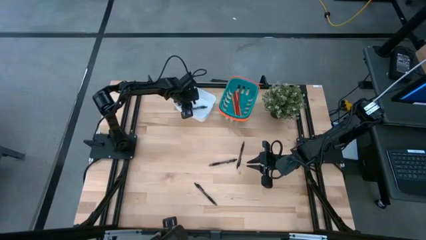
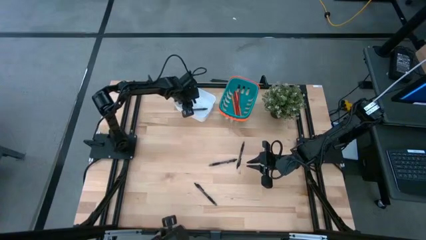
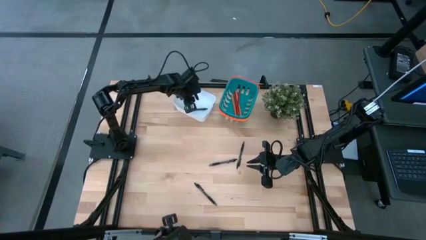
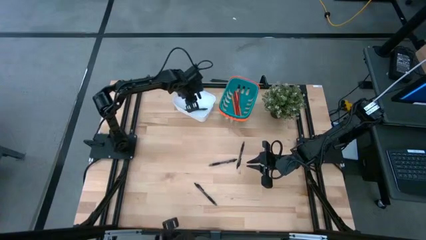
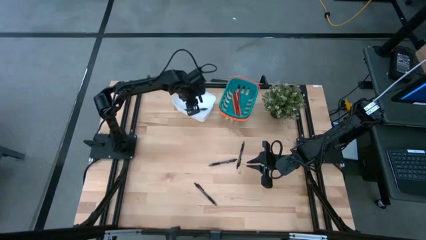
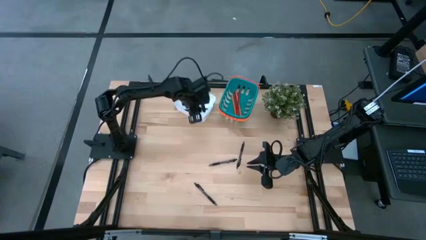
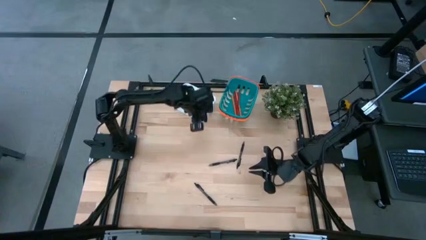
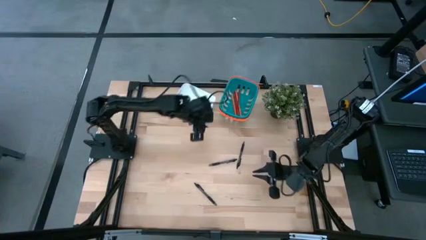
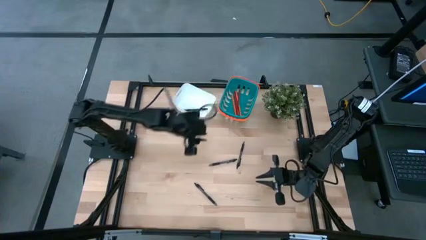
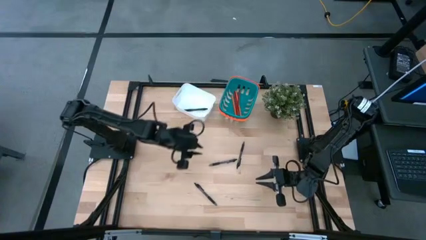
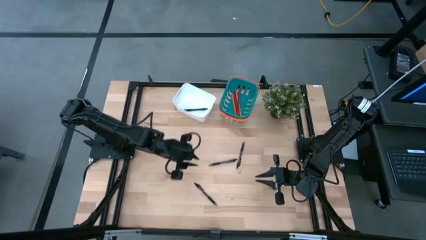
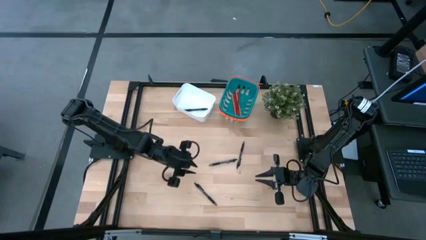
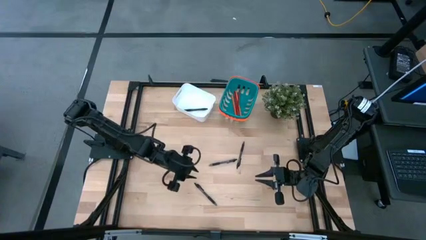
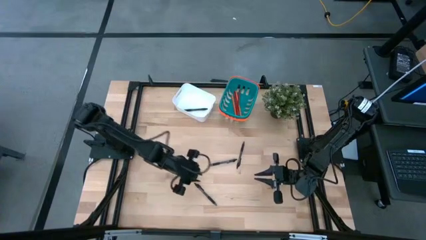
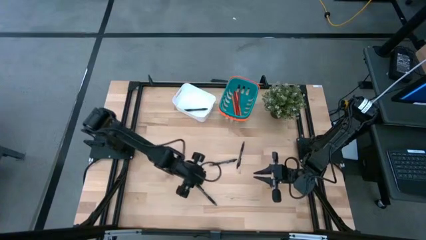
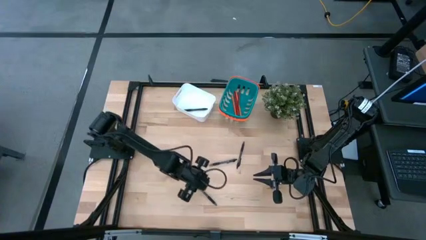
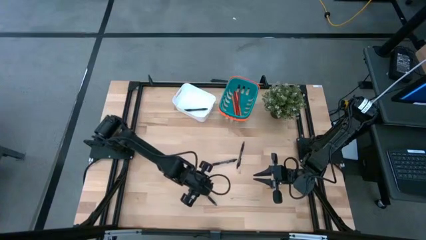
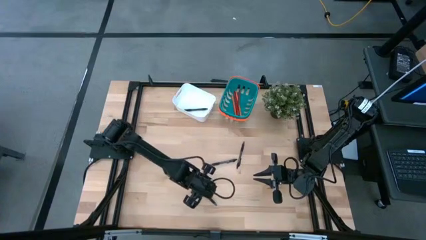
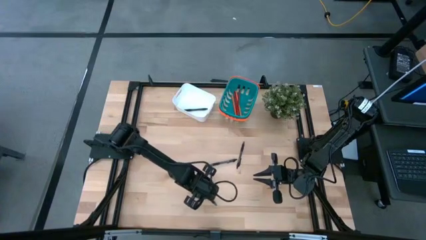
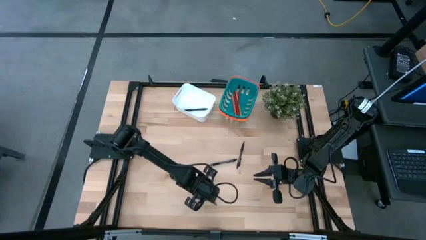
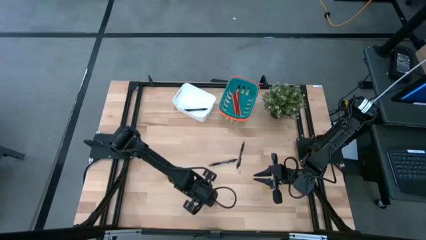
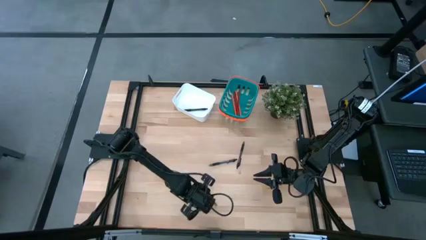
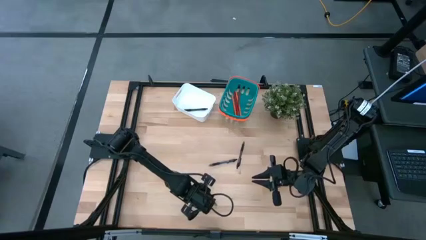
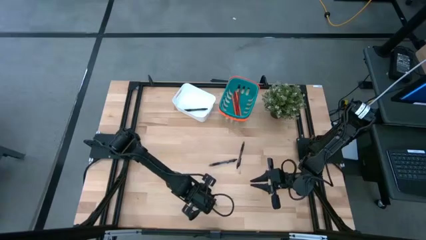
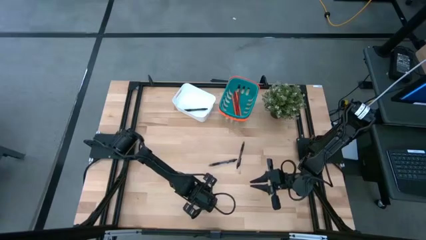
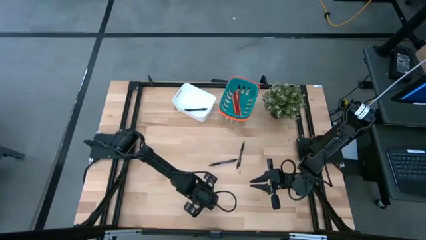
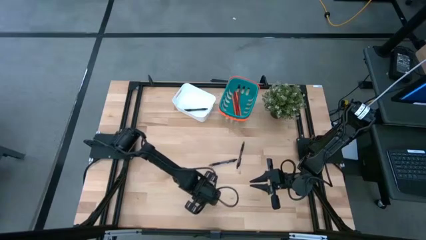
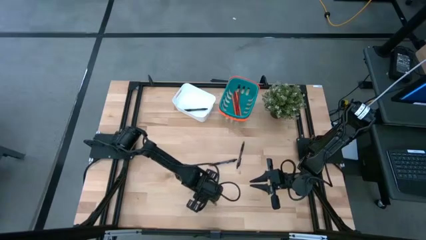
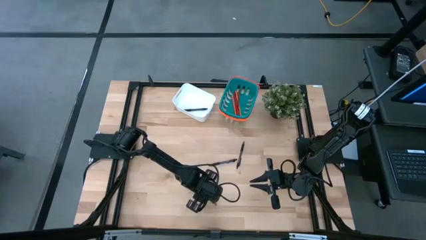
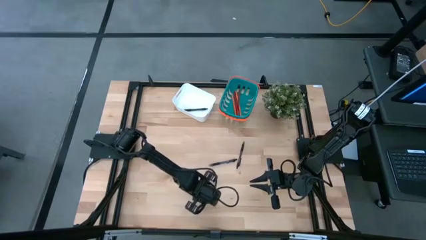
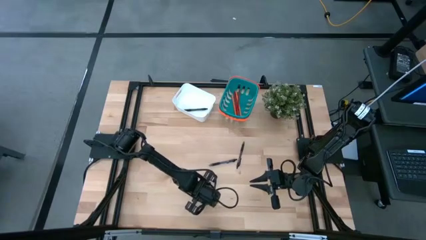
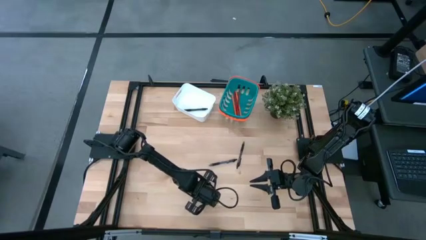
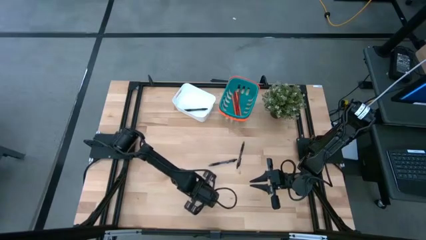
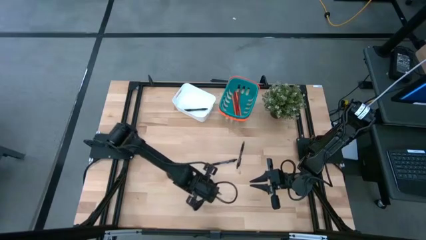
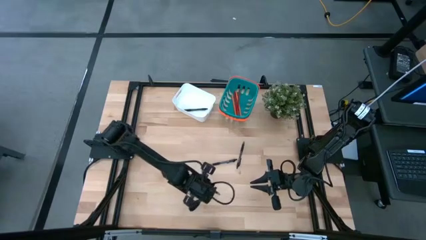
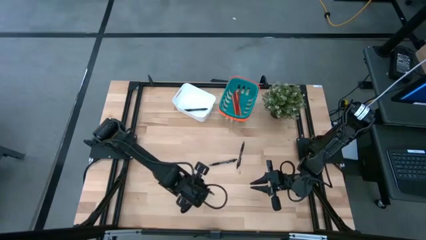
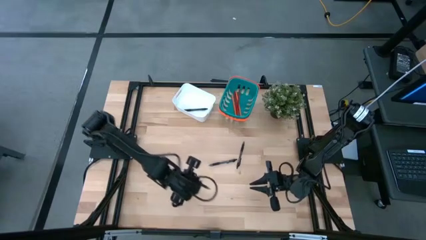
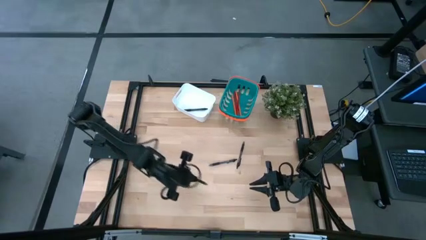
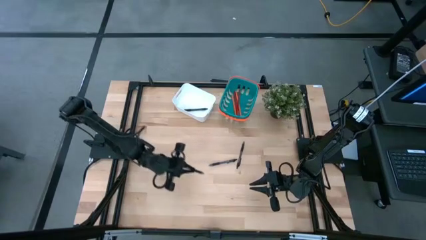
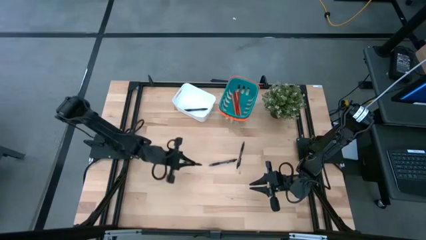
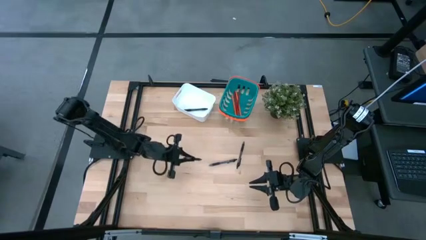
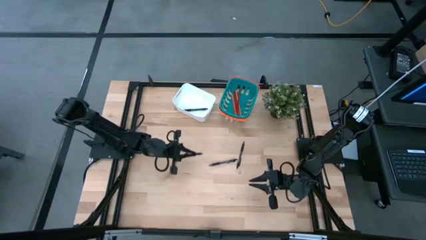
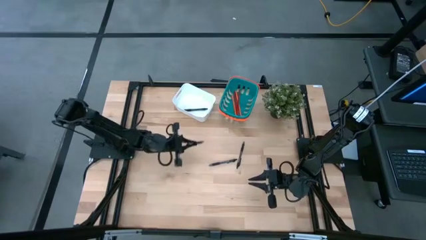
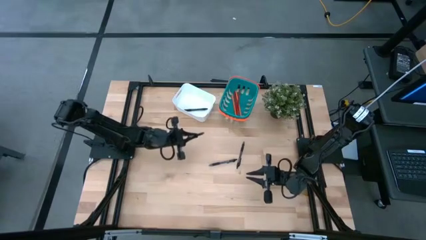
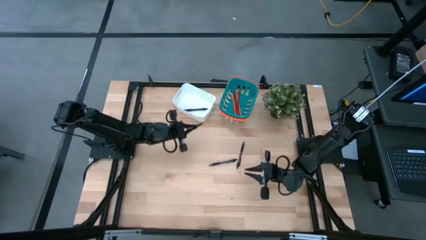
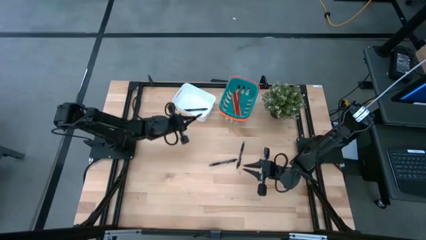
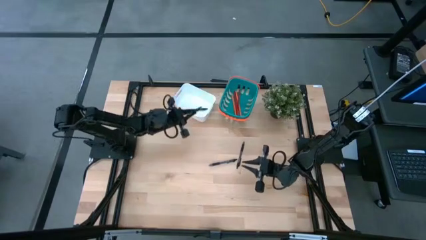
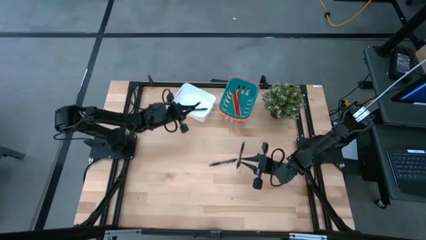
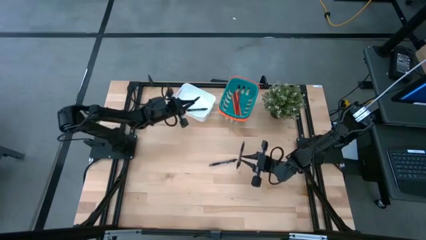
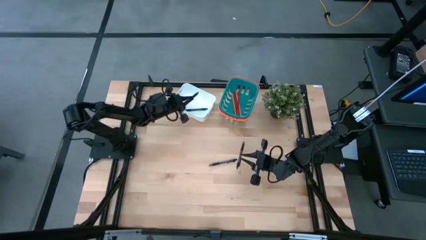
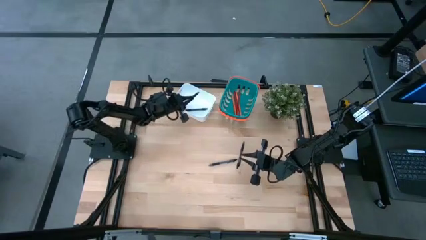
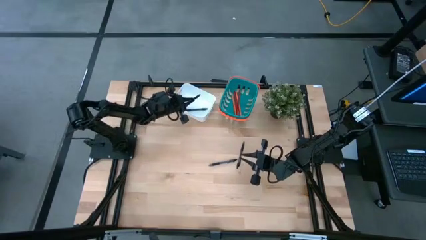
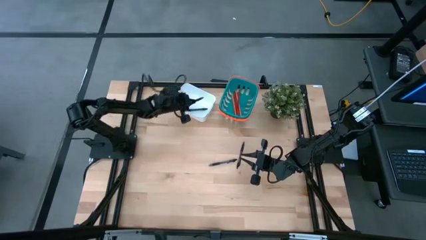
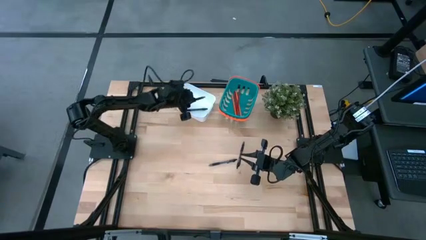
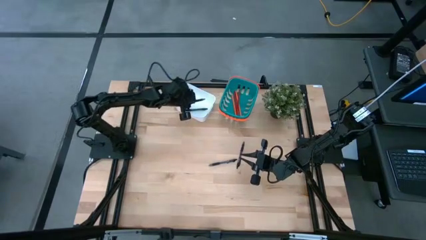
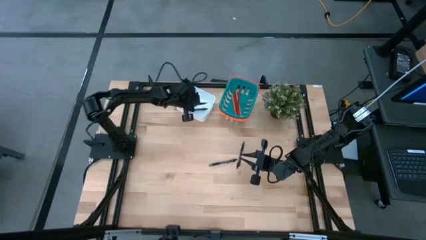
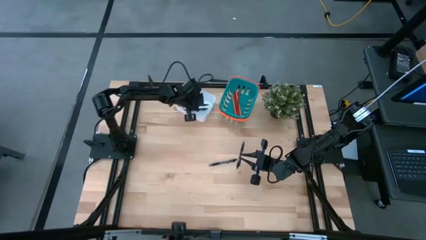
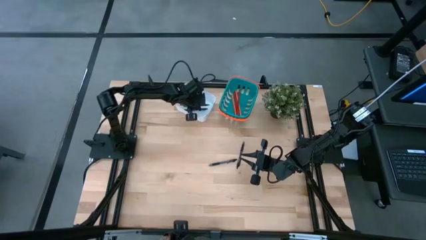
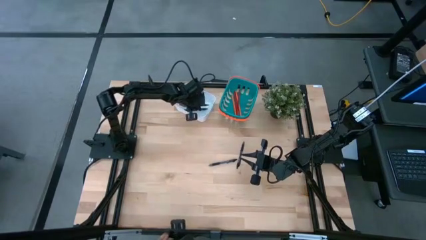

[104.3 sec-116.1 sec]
Task: Sort pens & pencils
Put the black pen into the white bin

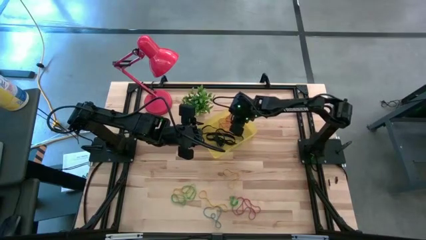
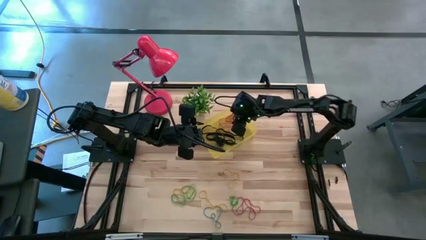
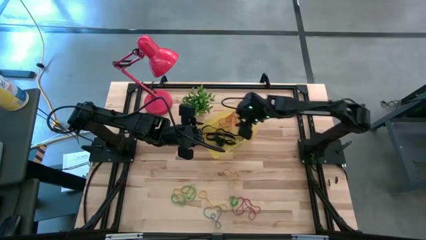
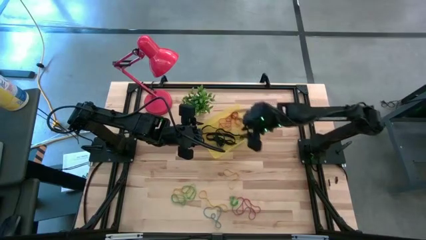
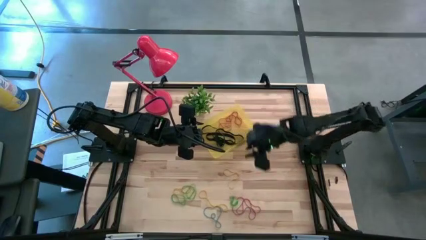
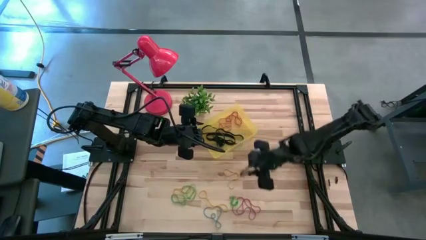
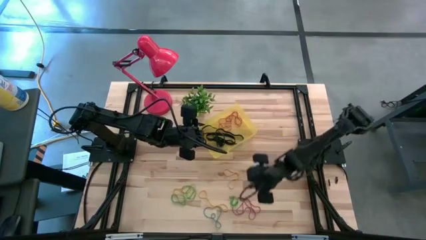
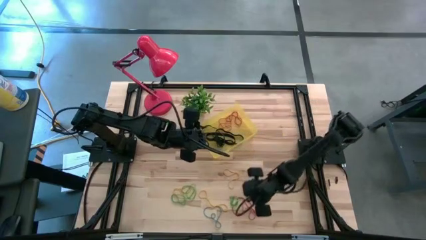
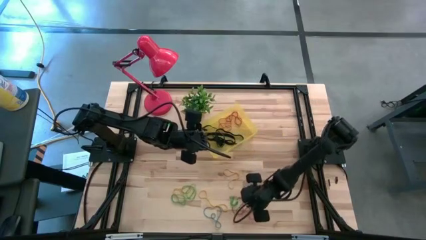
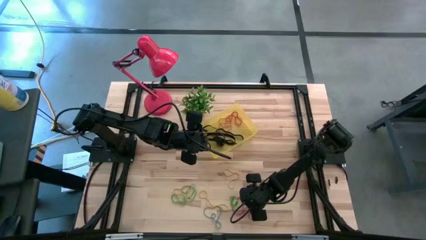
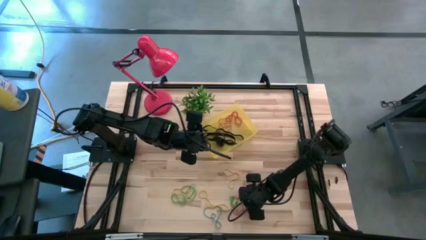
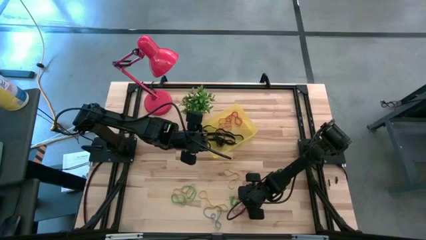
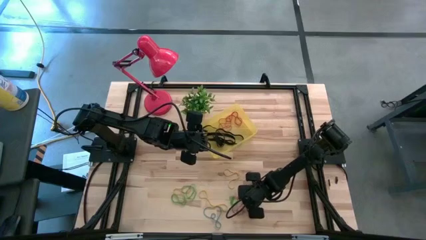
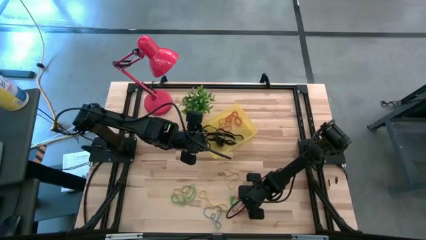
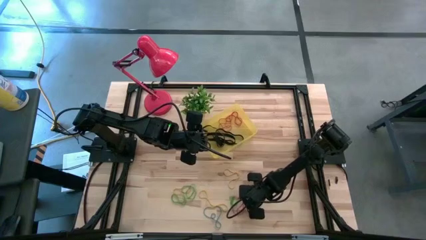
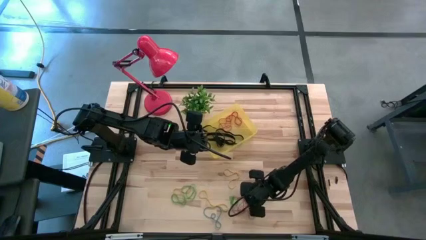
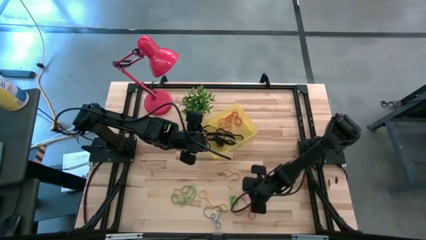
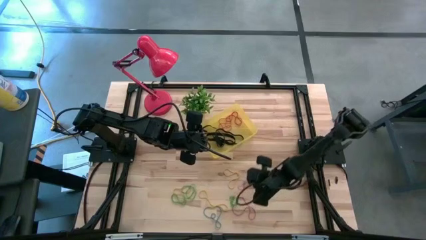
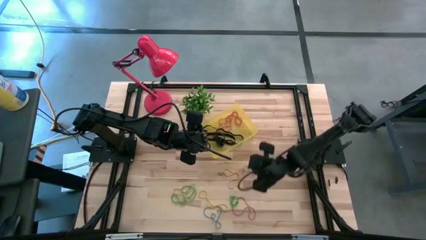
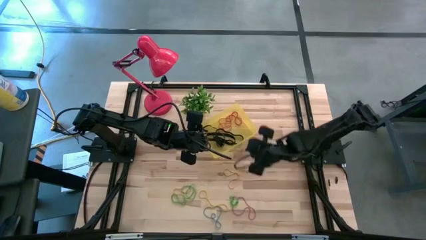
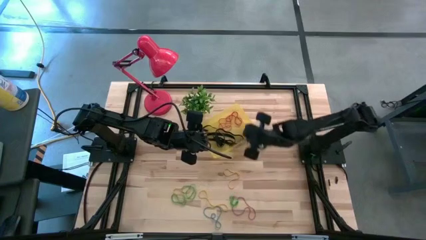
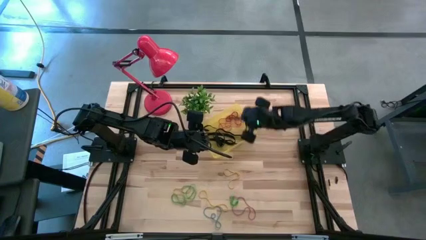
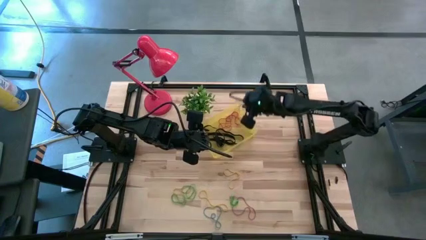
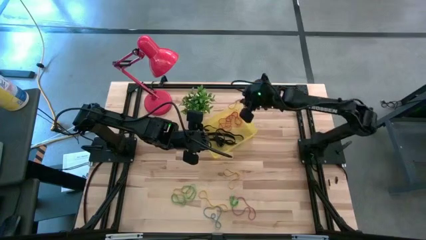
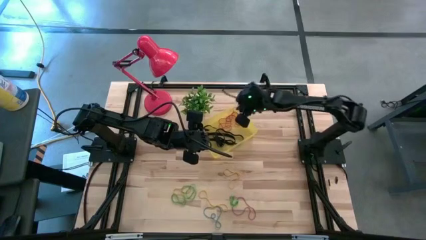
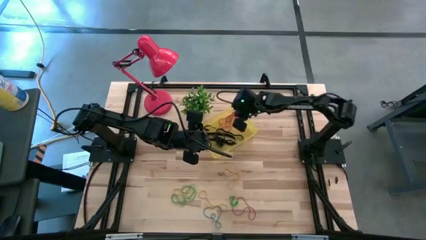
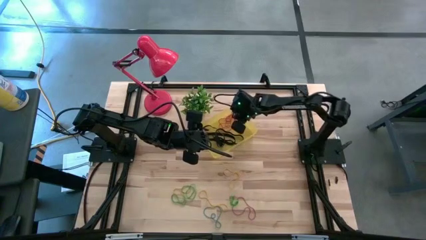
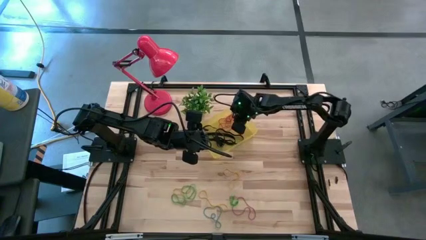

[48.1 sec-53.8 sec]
Task: Pick and place rubber bands into bin
Put the red rubber band into the transparent yellow bin
